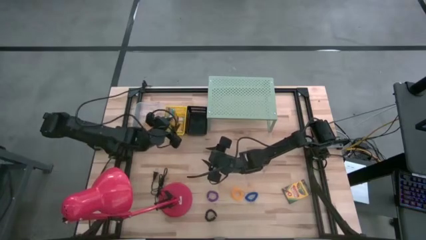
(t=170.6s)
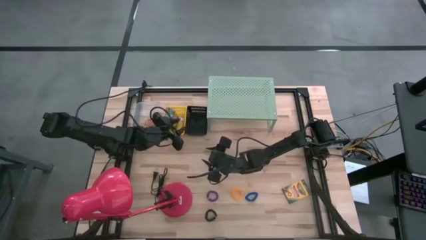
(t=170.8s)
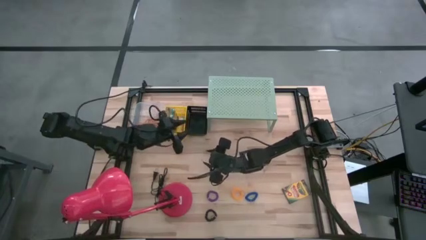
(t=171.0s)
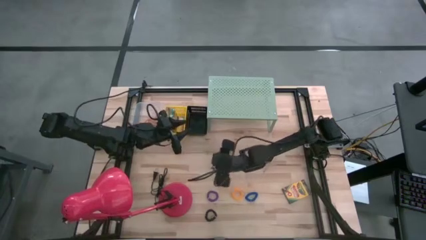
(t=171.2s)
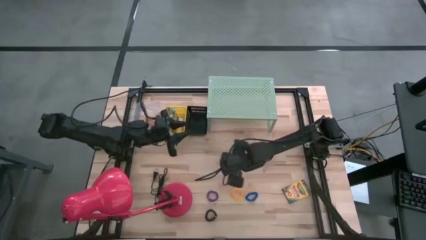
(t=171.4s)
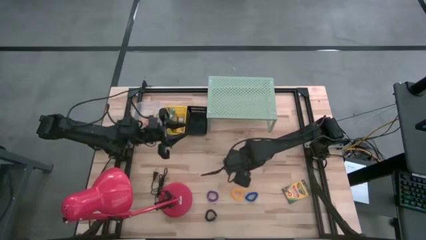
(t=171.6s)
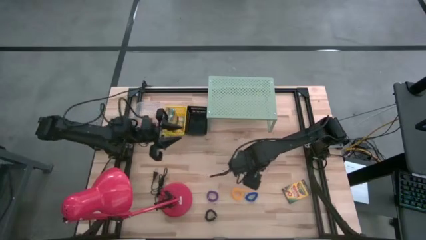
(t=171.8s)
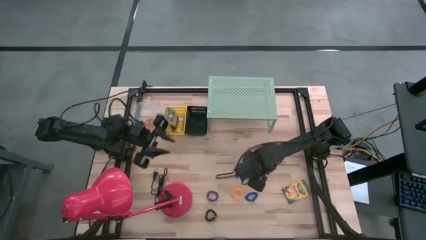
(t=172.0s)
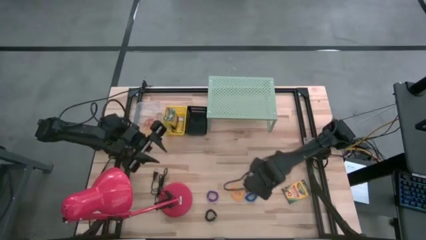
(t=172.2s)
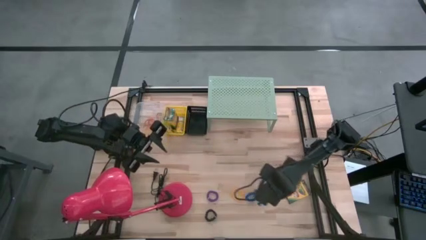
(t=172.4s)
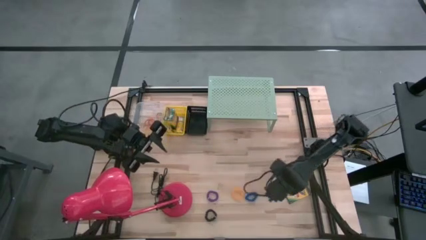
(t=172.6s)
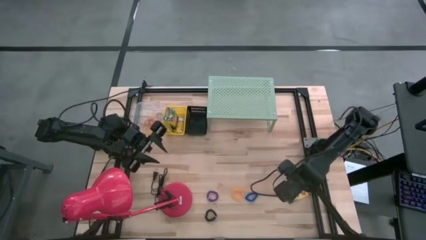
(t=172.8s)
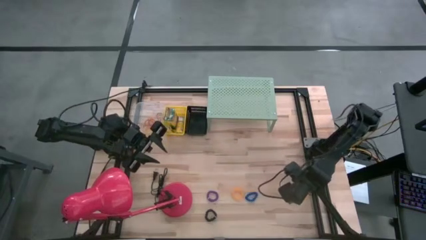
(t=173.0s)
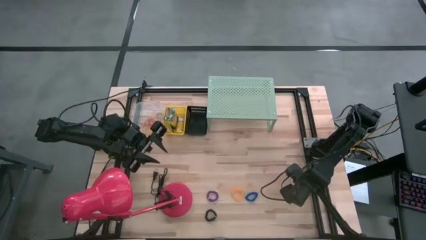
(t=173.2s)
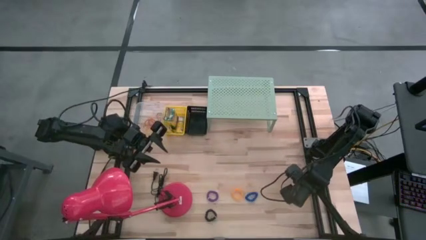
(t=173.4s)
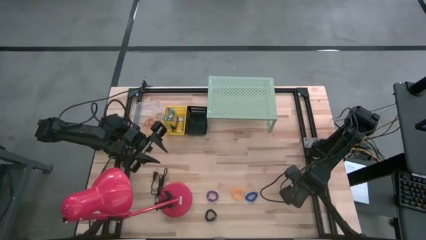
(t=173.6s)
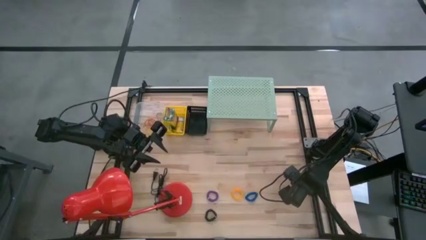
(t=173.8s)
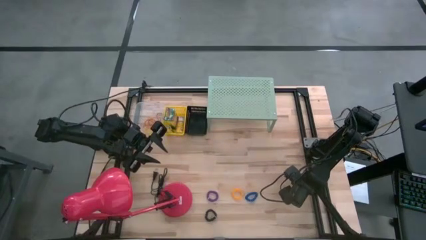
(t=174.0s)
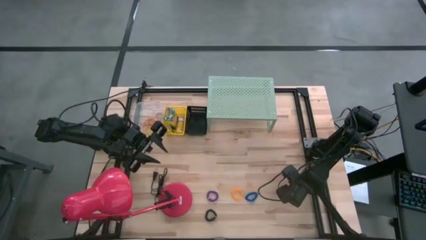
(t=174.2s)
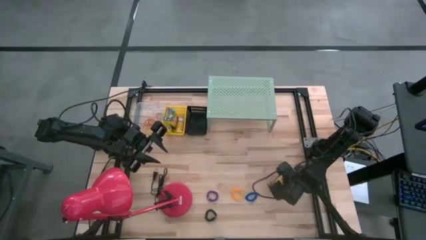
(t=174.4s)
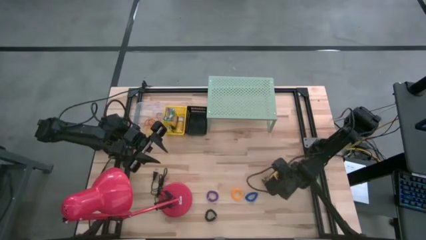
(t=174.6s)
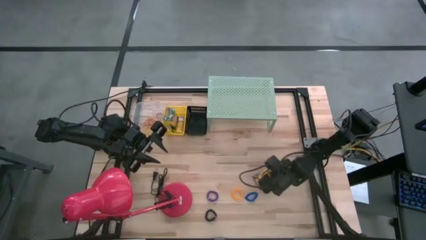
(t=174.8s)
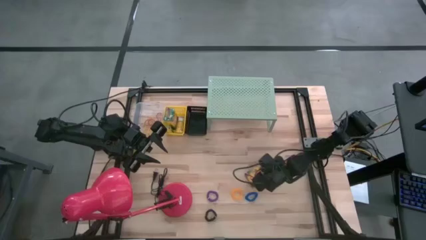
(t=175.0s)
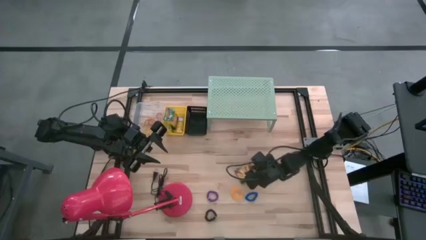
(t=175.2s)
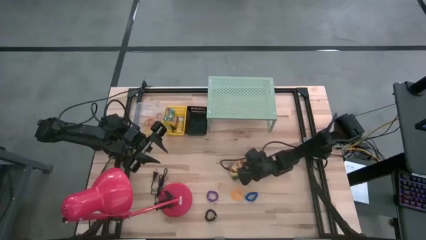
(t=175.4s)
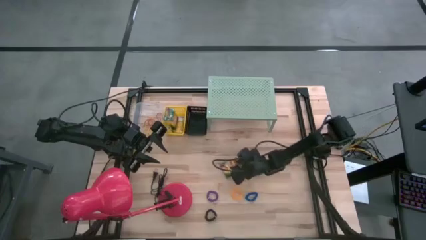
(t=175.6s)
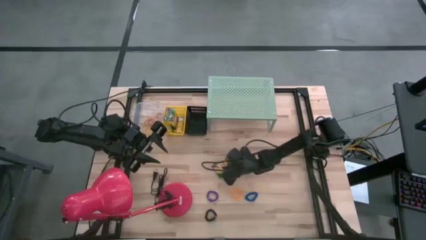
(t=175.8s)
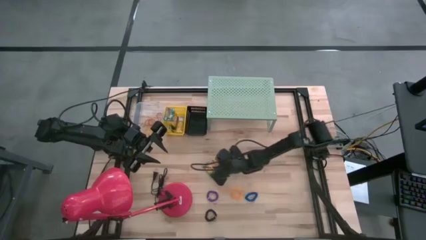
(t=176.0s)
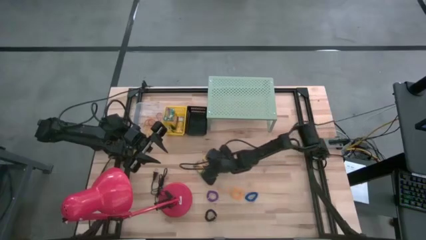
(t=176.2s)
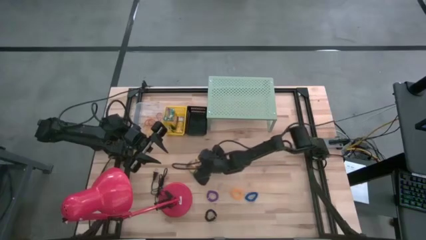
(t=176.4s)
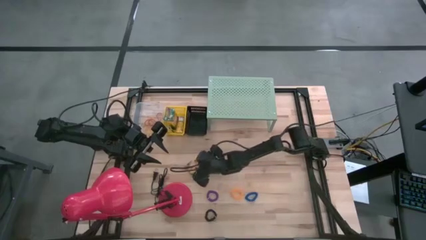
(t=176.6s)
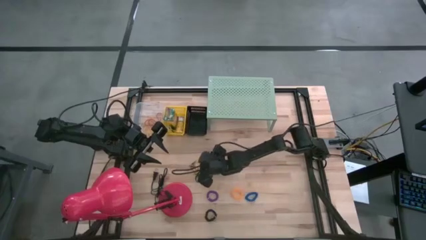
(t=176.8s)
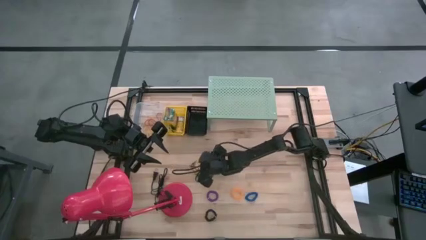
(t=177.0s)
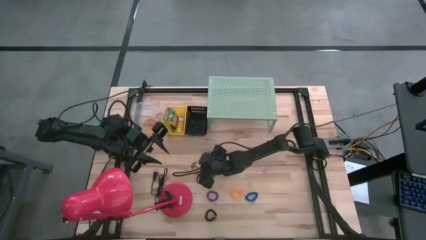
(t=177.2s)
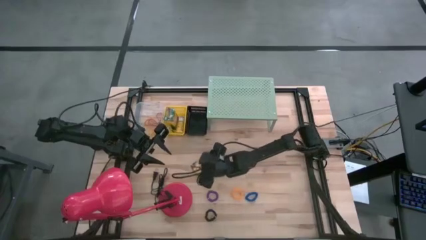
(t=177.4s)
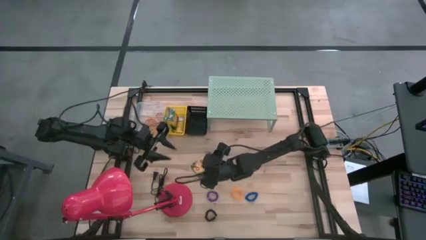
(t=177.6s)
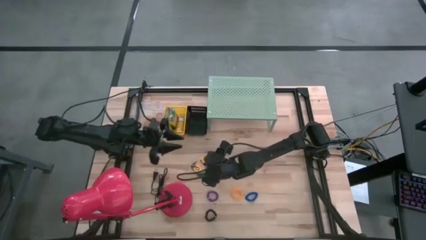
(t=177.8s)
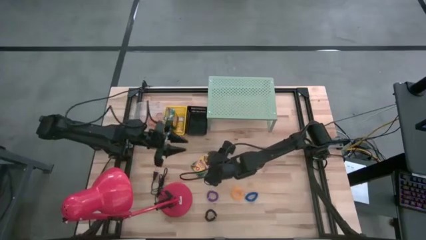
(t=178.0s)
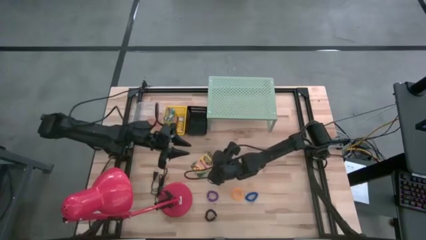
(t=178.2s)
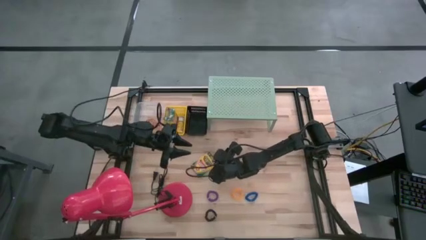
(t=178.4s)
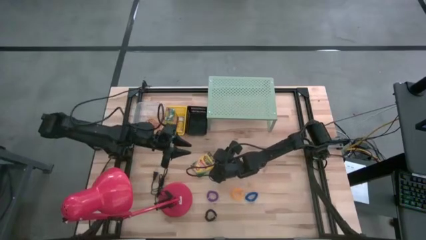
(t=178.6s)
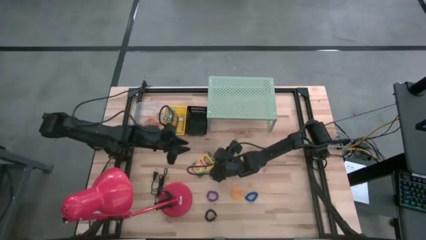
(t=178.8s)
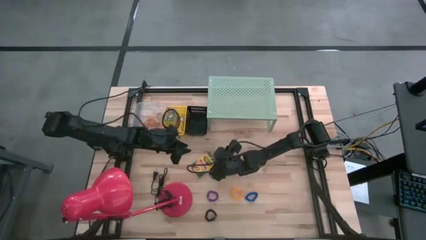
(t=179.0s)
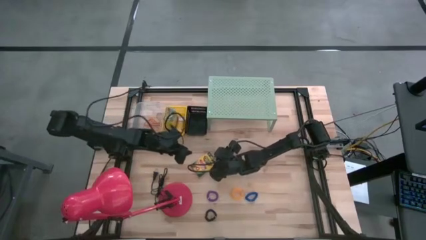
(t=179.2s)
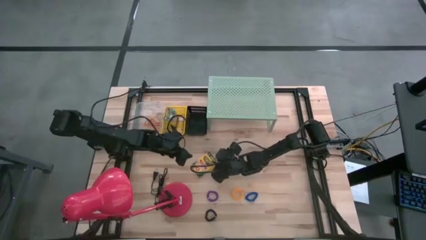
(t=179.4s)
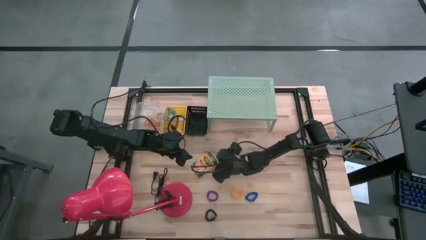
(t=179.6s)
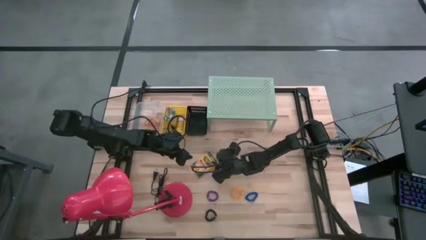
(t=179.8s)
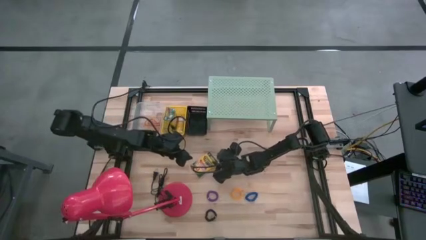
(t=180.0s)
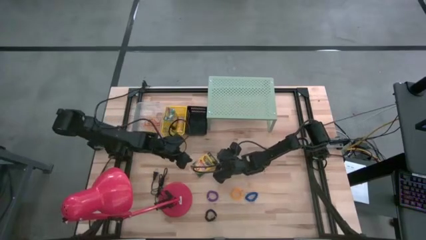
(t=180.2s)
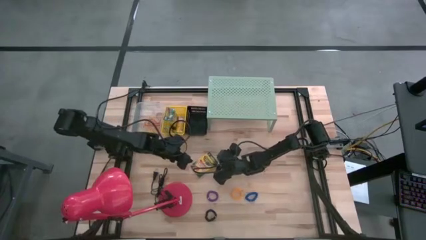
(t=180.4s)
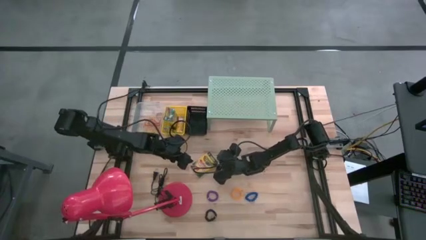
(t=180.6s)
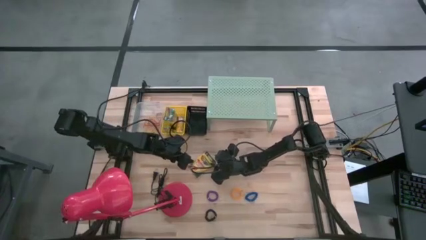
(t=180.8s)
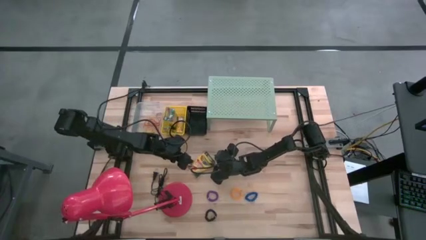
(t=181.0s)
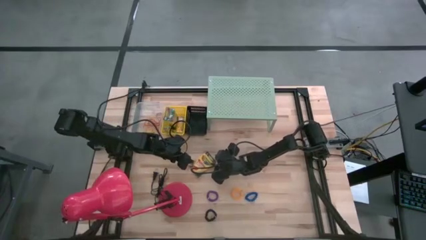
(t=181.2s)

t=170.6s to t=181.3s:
Task: Pick & Place Office Desk Supplies
Put the crayon into the yellow bin
